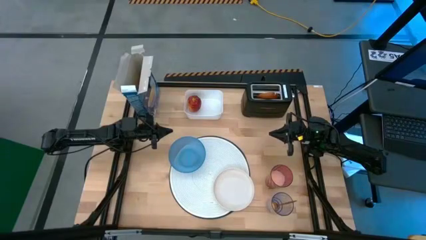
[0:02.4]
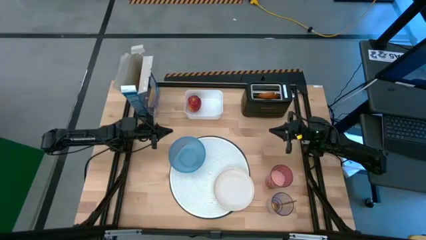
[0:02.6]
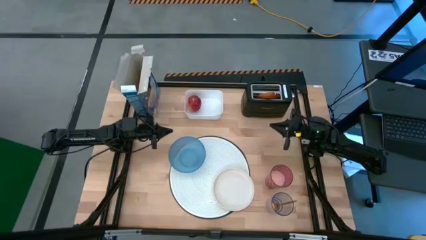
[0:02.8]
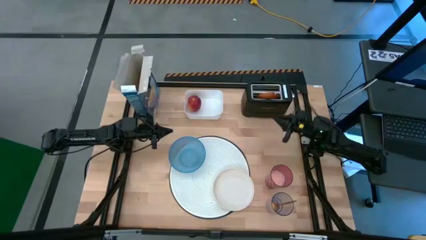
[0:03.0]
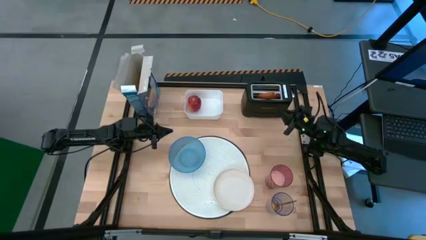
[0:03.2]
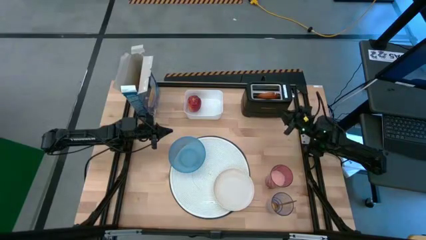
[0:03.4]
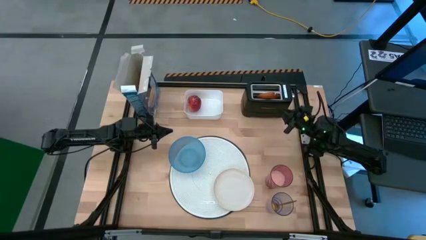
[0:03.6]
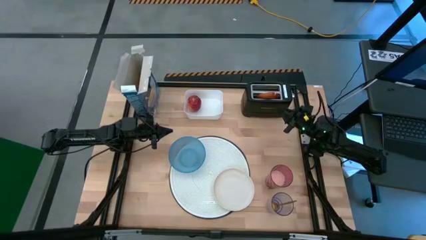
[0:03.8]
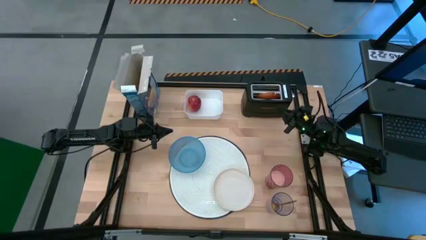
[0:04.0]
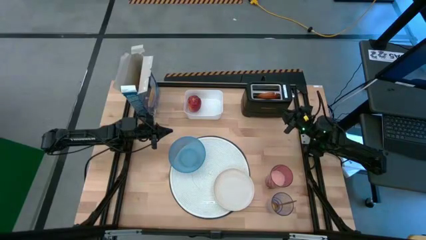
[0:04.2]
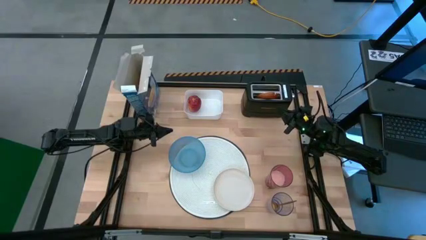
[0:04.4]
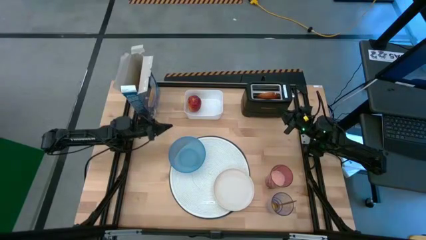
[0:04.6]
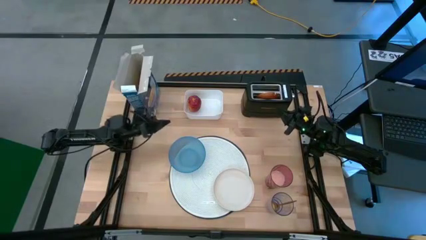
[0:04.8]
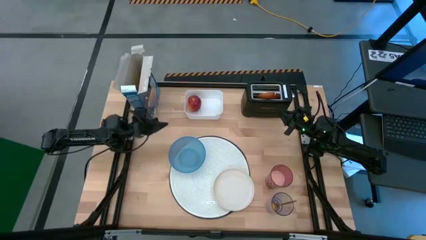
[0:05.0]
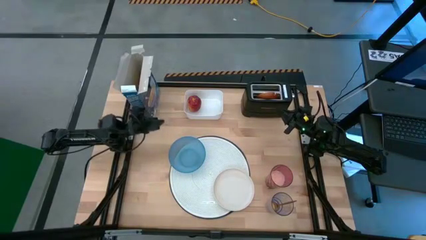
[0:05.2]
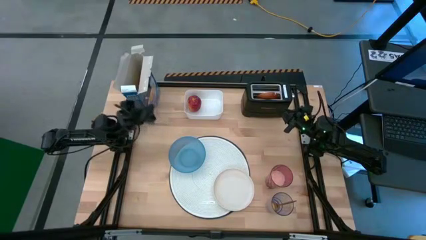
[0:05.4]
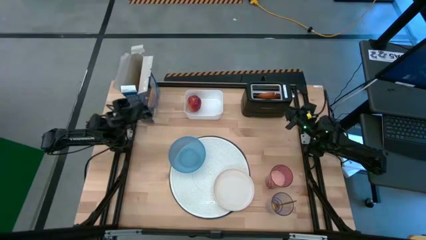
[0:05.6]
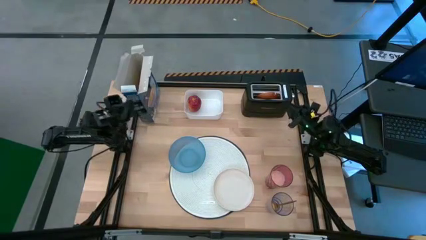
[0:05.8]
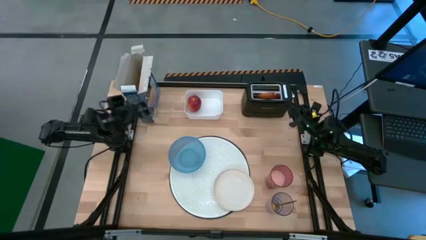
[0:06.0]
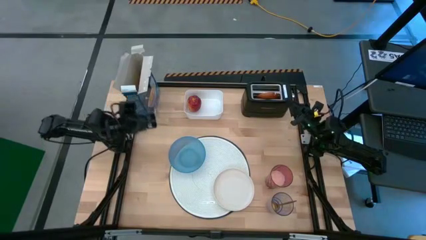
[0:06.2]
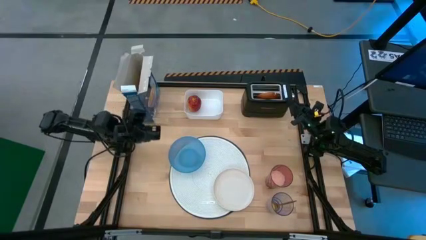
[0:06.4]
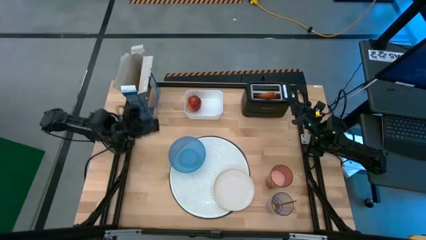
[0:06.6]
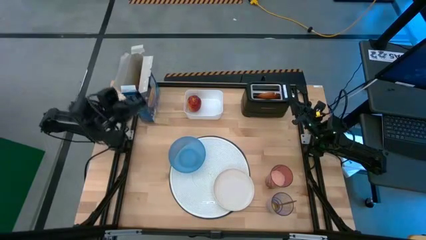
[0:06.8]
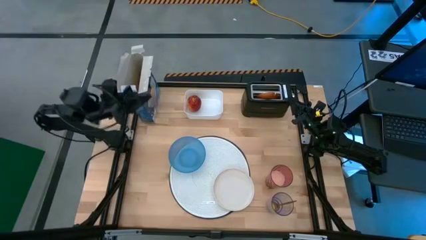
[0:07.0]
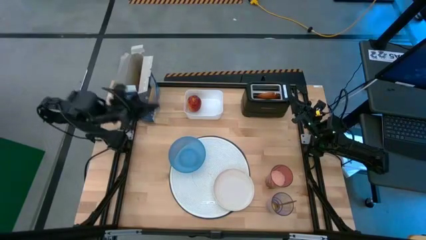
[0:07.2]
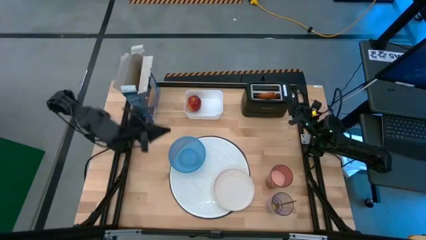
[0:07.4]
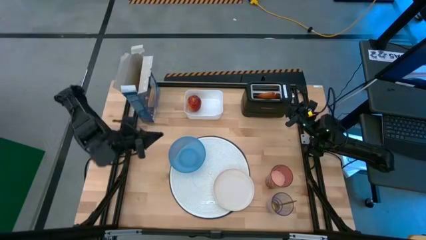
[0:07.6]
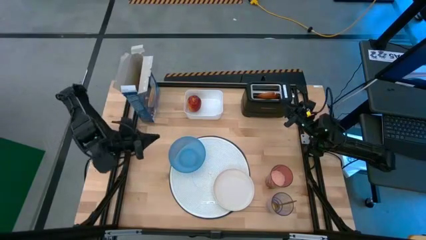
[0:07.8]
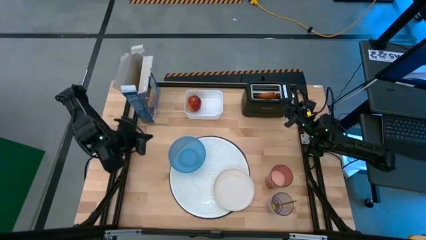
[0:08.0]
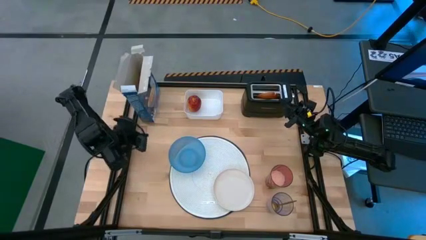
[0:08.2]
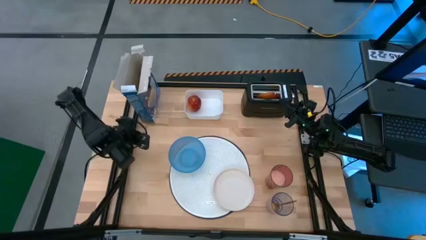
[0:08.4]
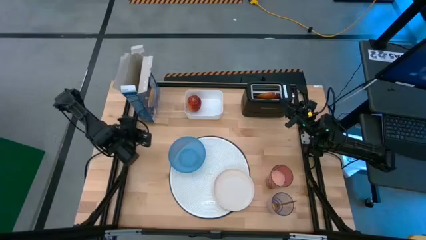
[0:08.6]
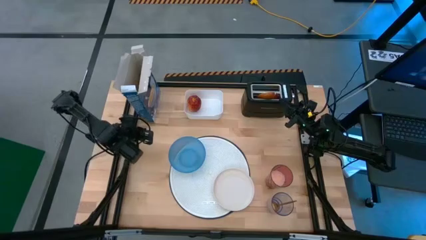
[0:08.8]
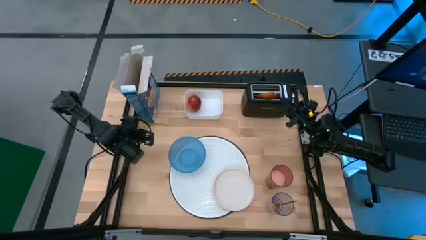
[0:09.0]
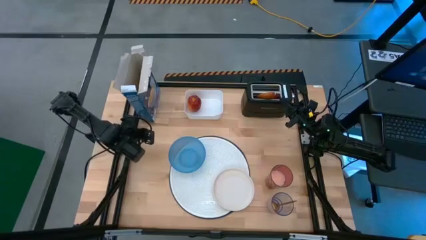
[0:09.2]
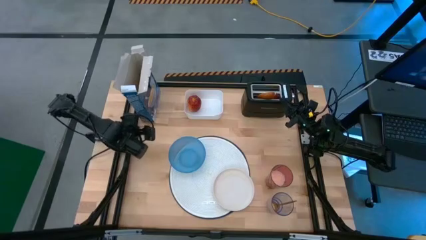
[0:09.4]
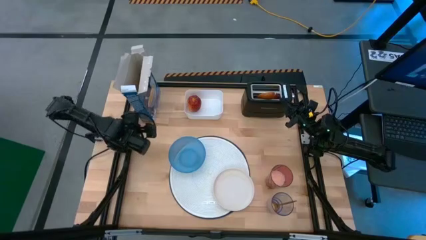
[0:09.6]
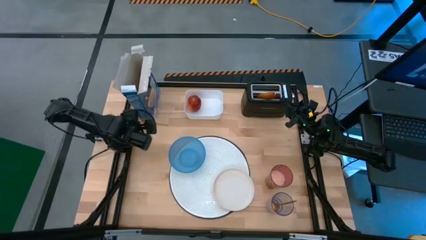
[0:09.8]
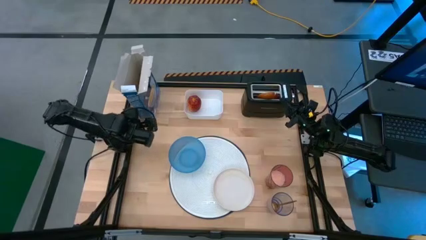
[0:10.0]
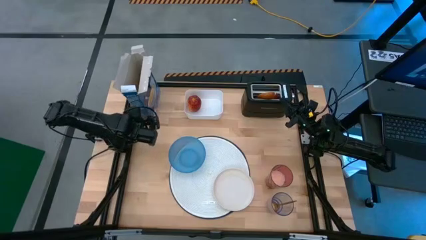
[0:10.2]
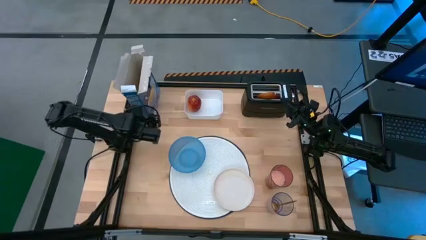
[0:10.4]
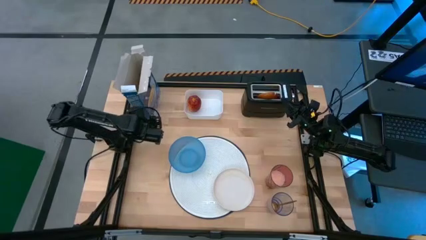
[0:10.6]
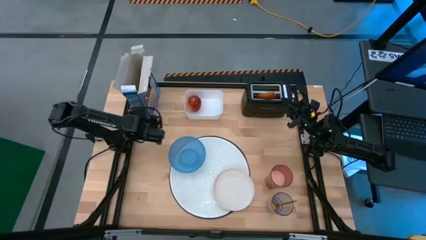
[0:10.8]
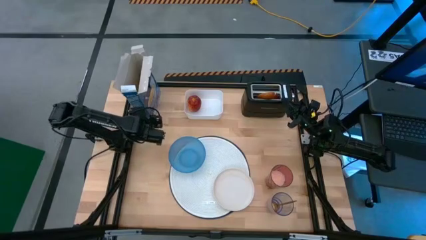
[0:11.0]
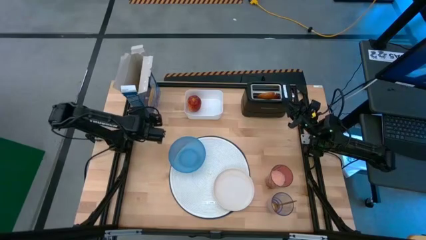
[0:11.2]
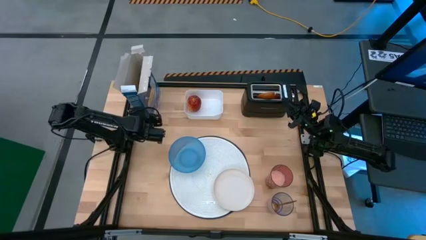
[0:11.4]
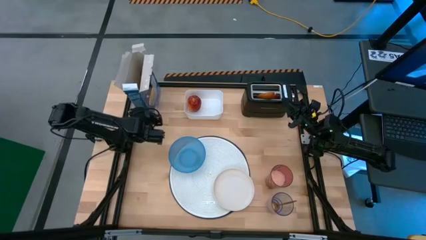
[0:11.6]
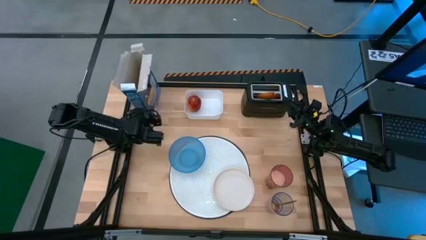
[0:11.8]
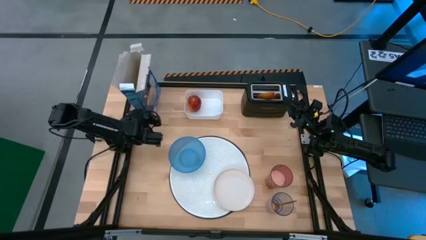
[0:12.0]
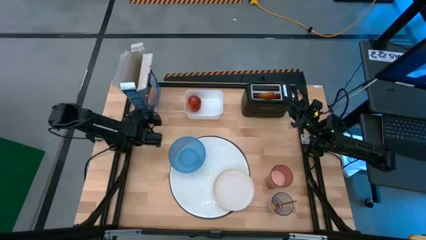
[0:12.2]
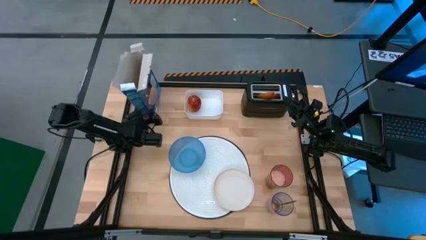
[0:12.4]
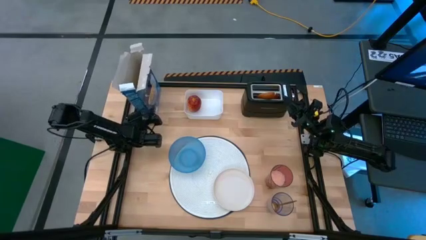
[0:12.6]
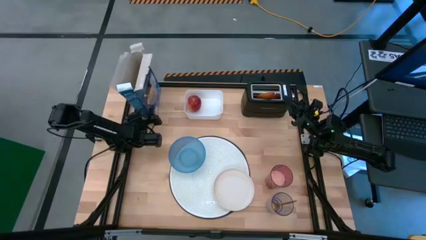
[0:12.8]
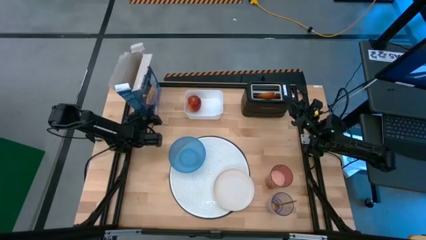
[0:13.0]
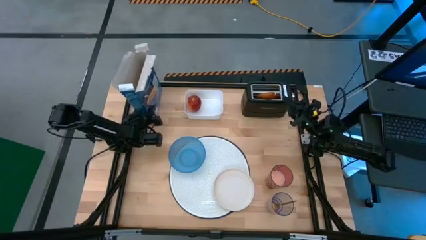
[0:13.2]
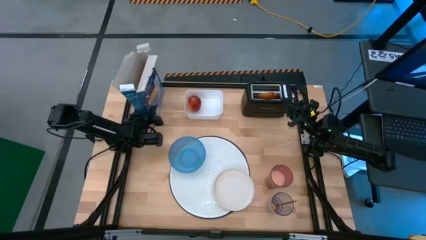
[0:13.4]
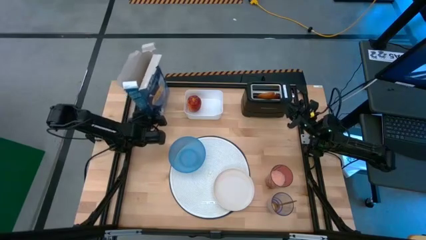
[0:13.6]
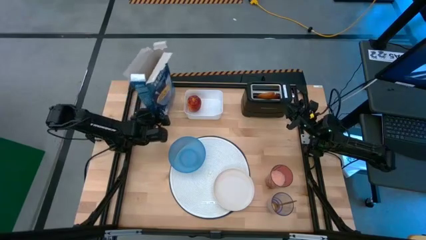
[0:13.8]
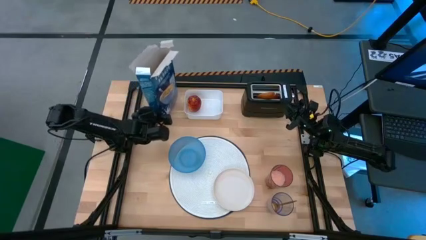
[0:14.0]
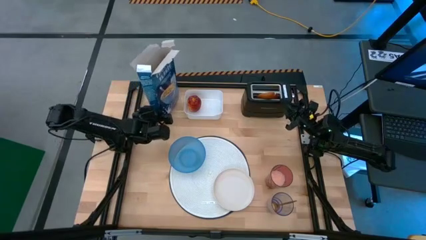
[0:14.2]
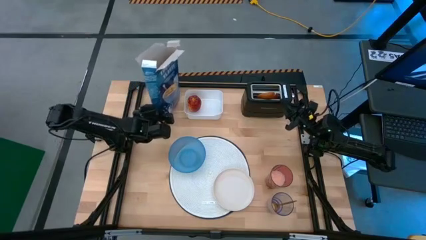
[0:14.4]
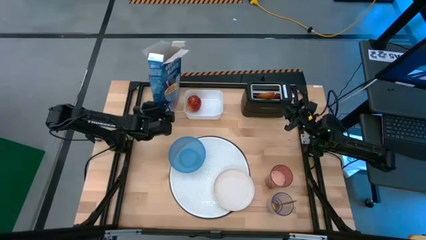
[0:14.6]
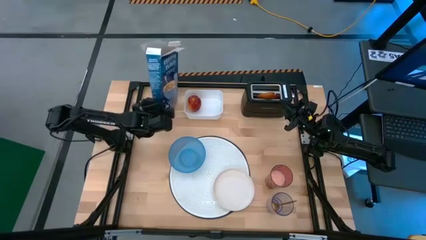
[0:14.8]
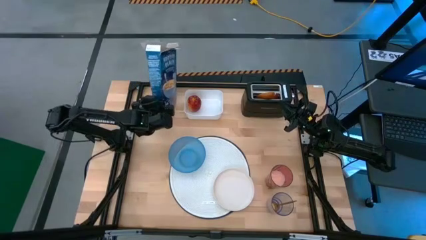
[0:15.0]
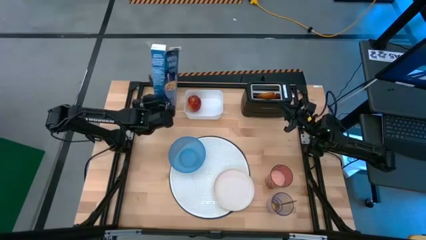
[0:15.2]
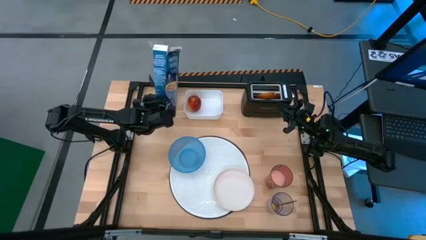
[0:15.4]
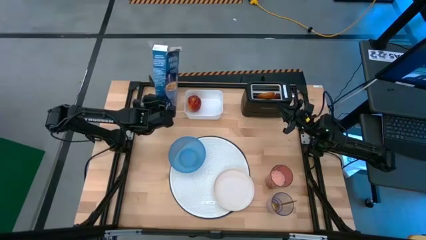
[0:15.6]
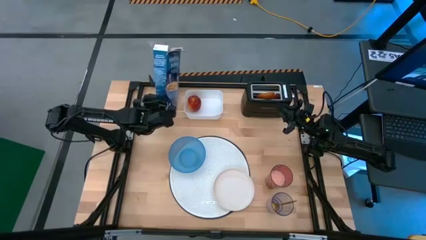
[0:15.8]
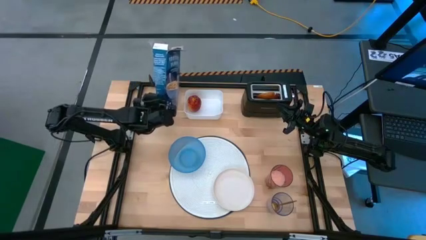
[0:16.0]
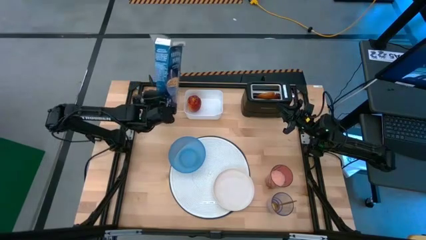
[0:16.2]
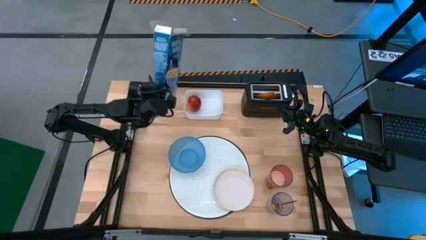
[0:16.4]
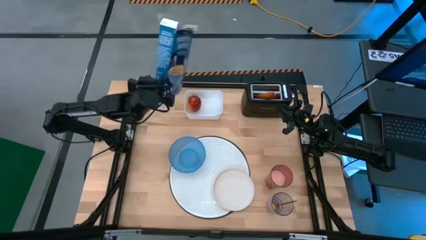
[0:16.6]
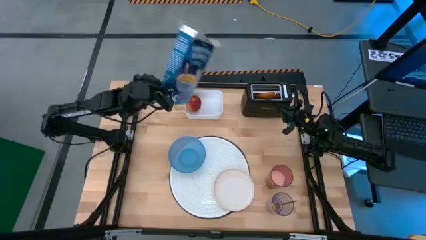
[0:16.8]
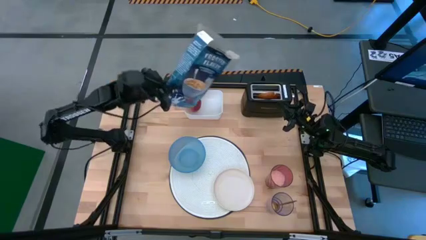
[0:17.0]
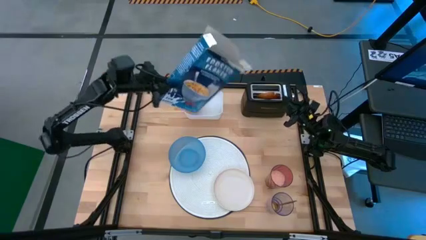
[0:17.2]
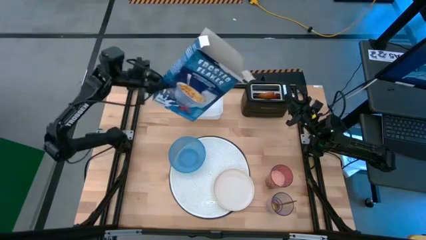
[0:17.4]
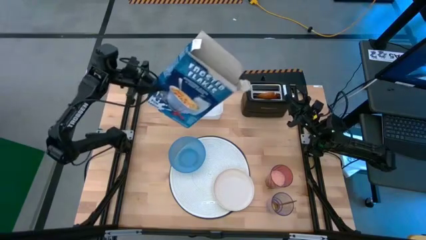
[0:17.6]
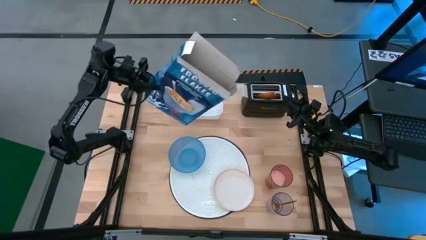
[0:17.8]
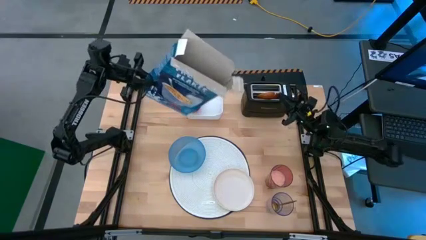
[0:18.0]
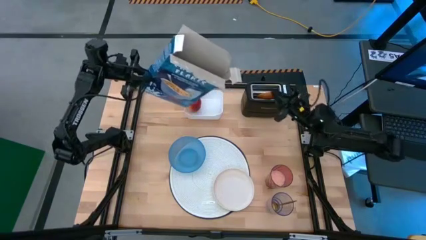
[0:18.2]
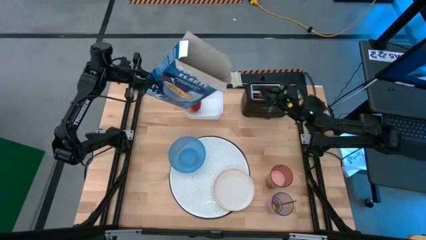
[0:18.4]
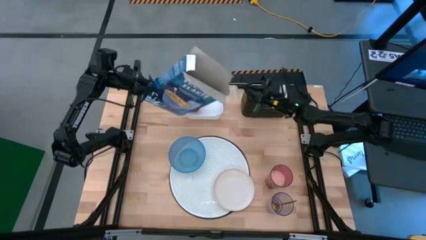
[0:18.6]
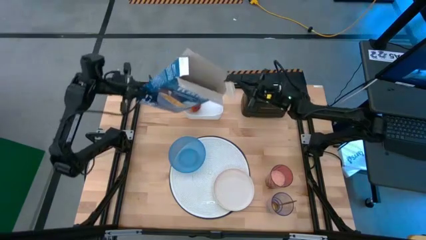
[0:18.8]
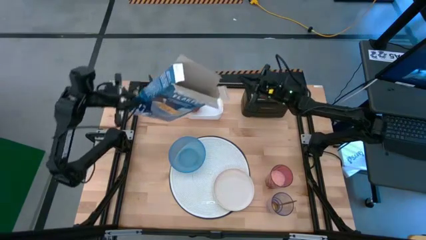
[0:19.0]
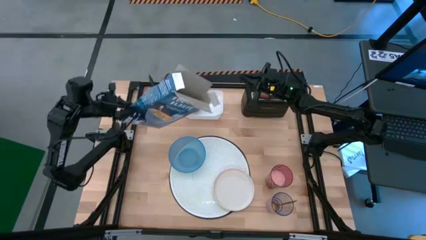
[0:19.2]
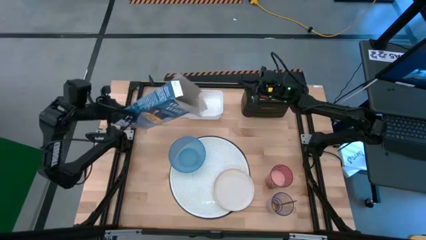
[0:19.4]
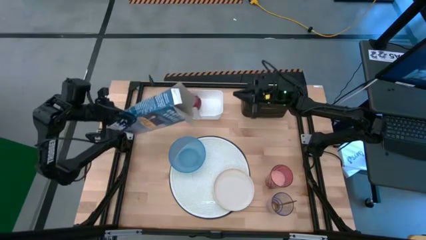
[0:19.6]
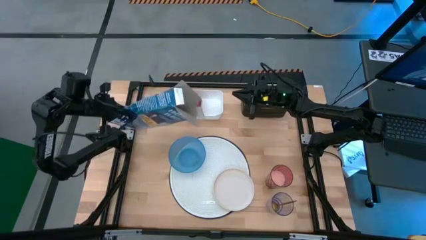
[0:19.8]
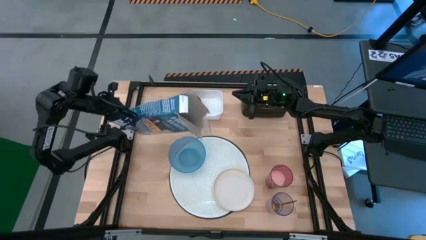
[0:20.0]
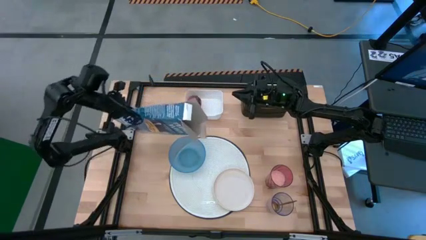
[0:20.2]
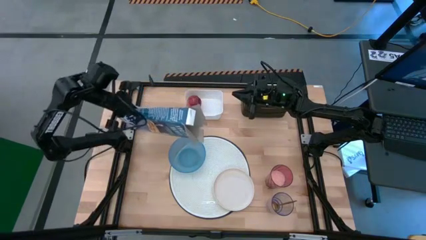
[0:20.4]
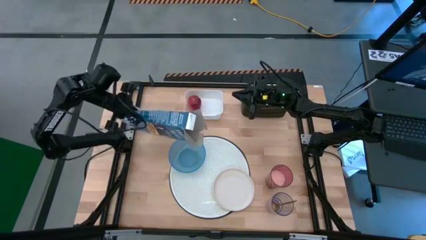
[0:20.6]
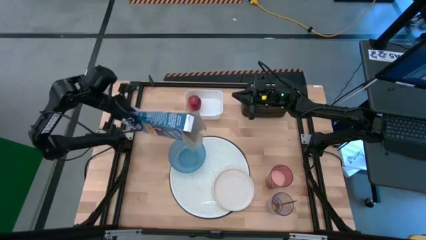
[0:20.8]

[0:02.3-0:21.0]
Task: Arrange a breakfast setting
Pour the cereal from the cereal box into the blue bowl
